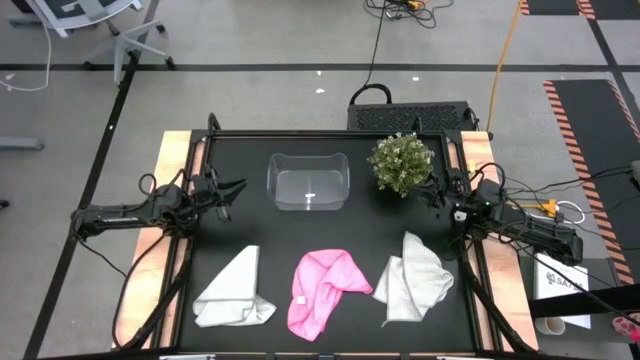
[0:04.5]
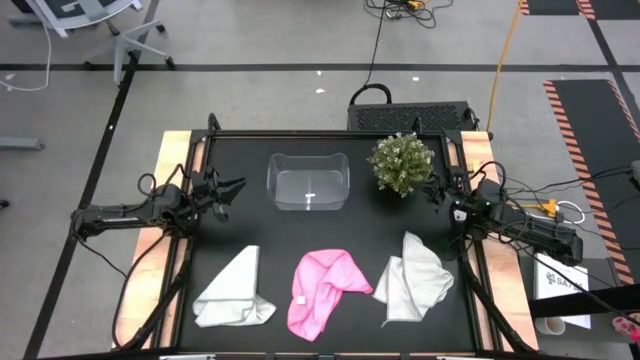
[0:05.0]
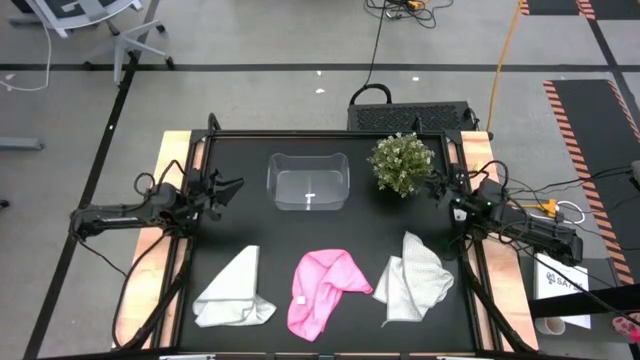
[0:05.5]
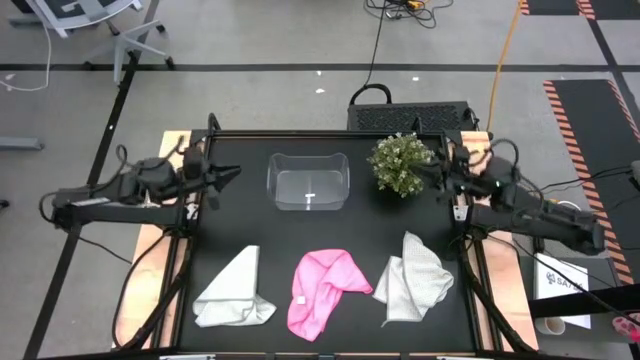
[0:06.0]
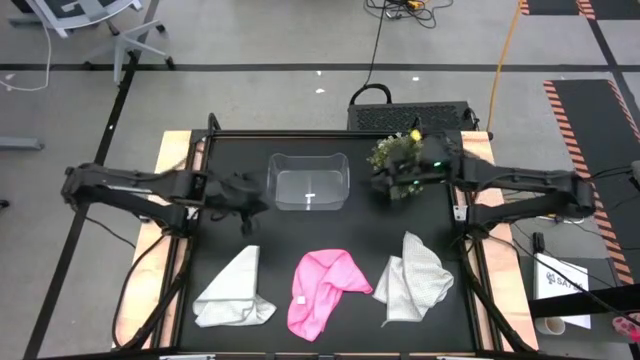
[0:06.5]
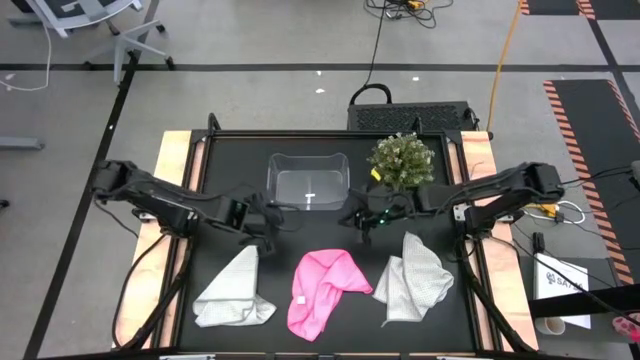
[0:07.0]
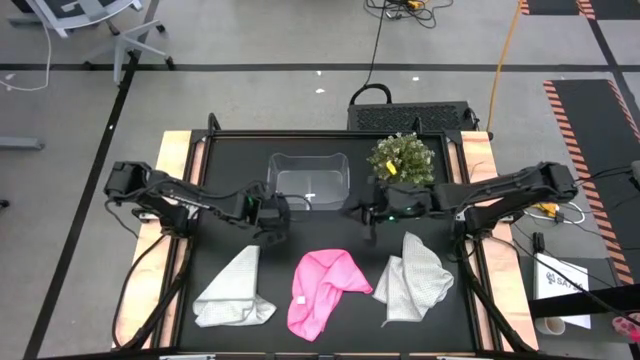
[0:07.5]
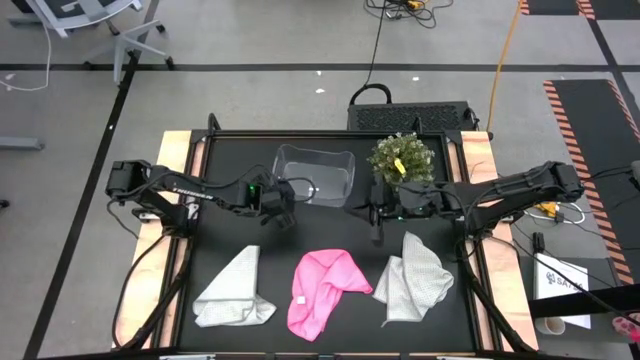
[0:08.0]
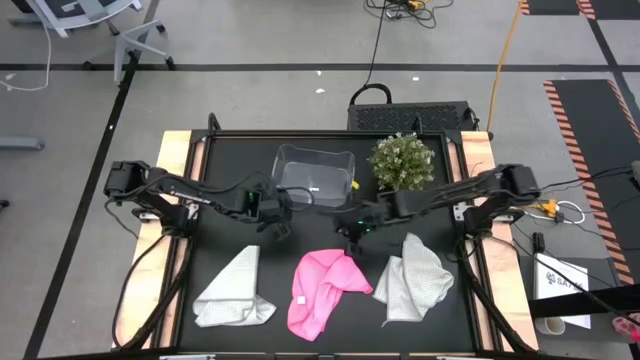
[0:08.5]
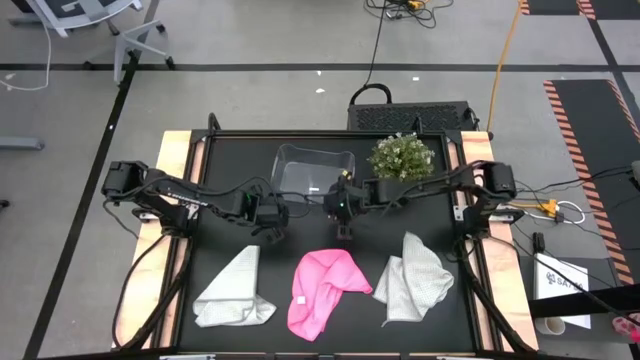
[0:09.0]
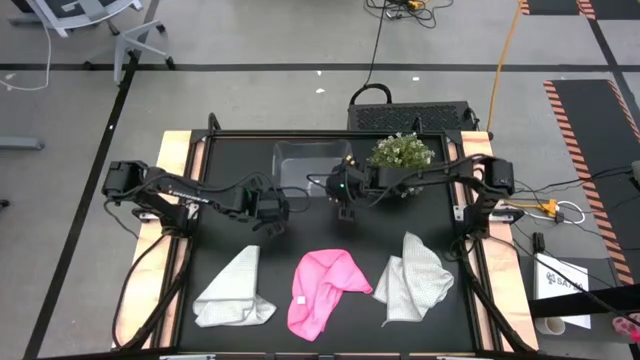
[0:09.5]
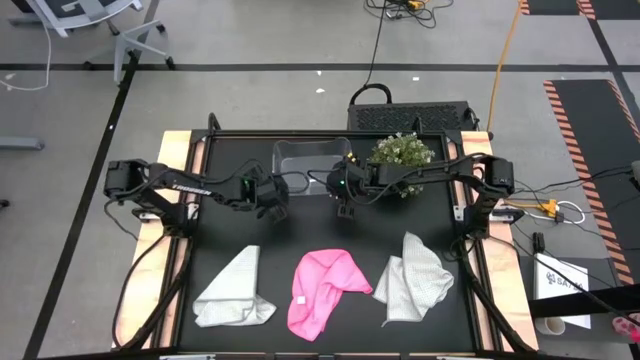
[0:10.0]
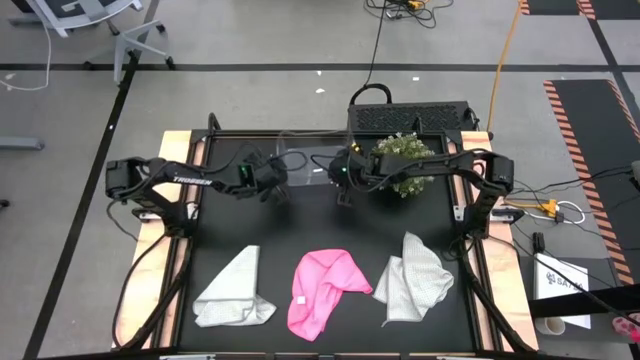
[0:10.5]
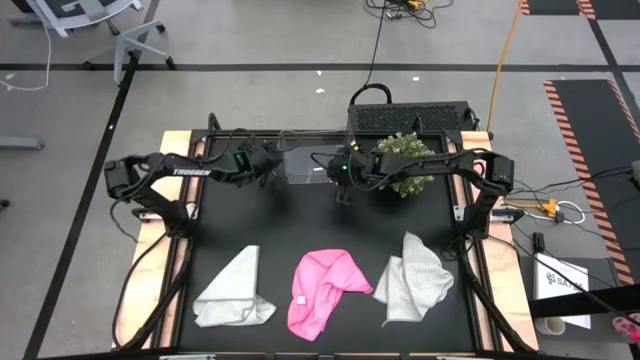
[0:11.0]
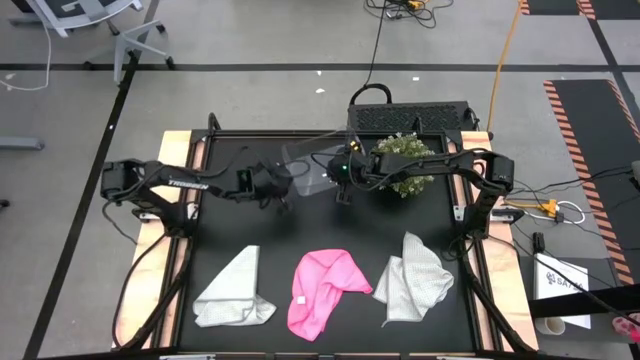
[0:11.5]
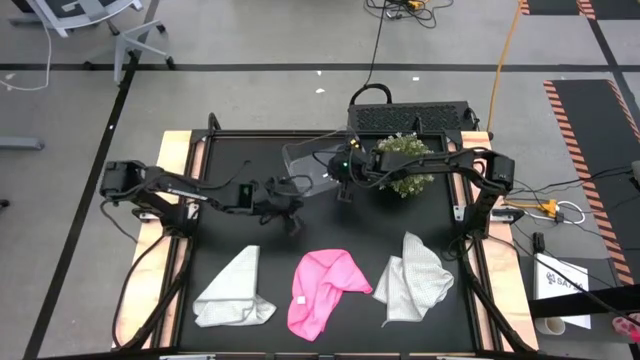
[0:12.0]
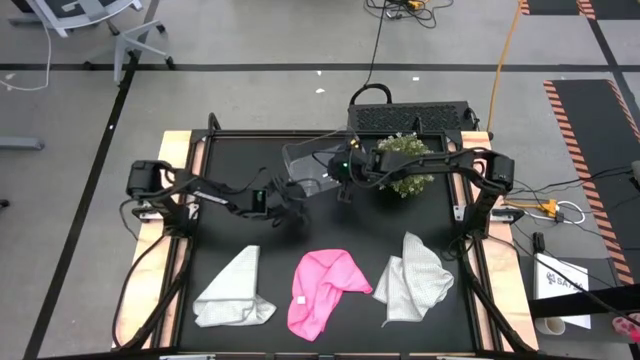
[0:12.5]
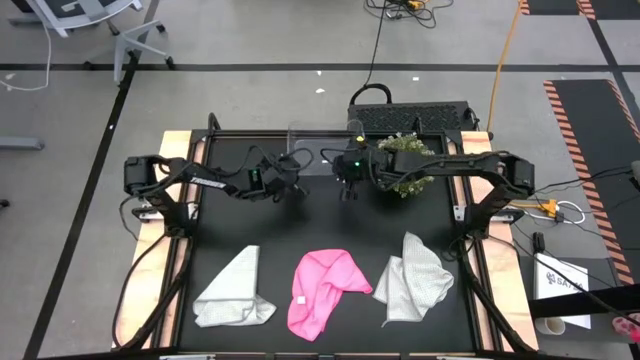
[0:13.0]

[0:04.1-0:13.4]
Task: Fold microfiber towels
Move the transparent bin to the top center of the table

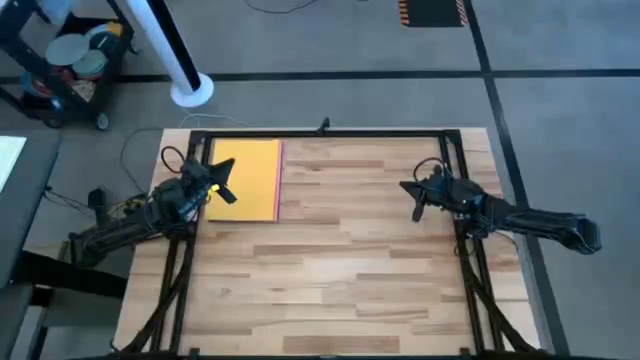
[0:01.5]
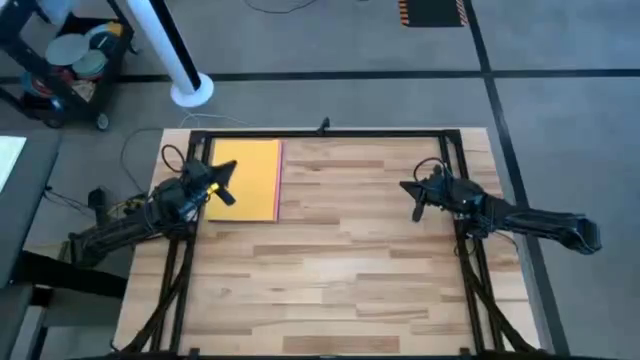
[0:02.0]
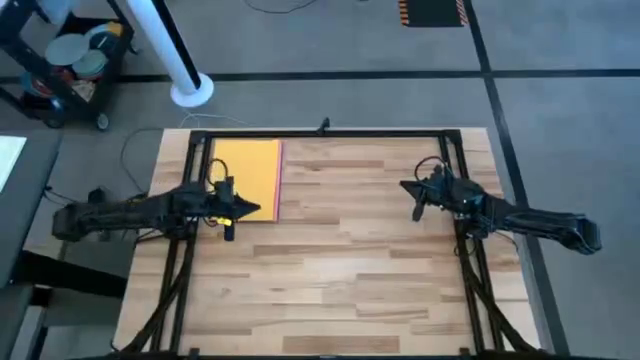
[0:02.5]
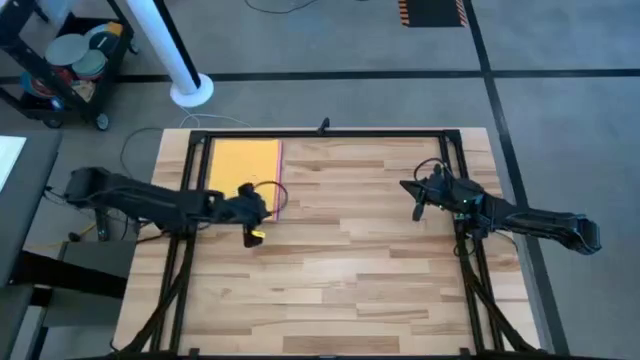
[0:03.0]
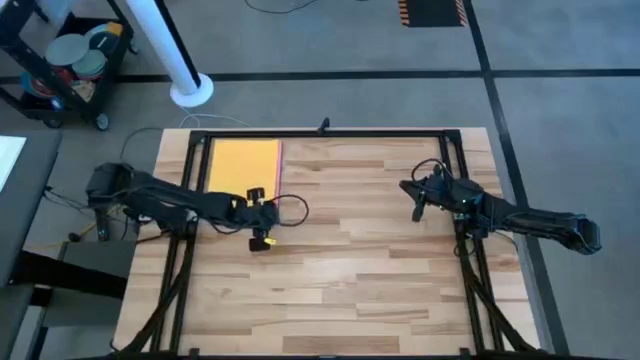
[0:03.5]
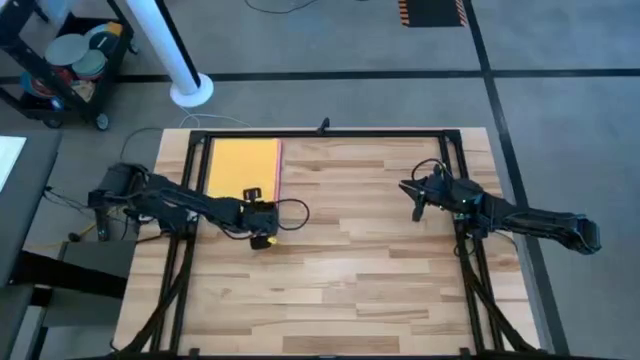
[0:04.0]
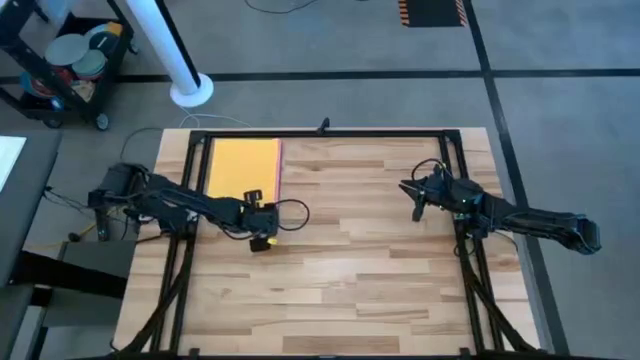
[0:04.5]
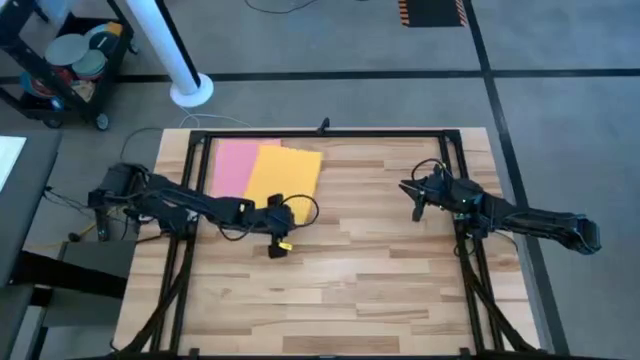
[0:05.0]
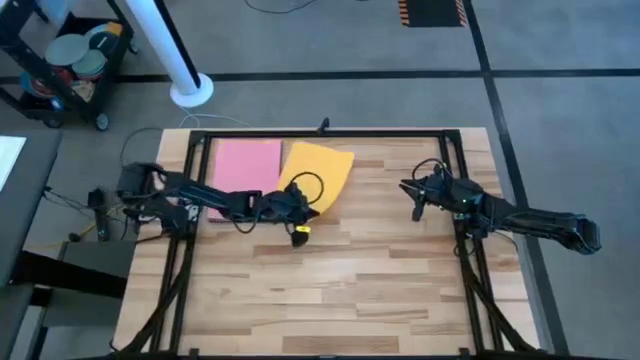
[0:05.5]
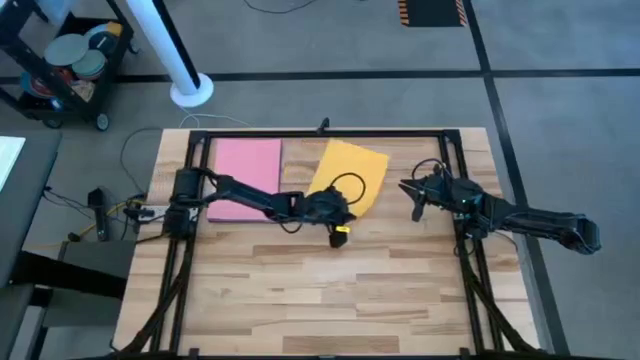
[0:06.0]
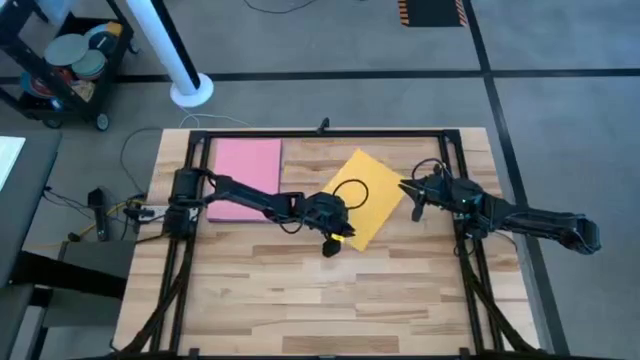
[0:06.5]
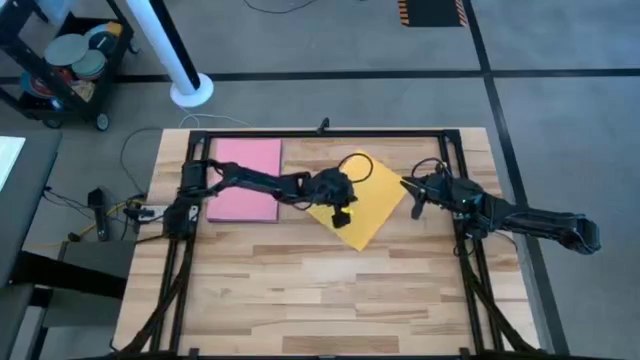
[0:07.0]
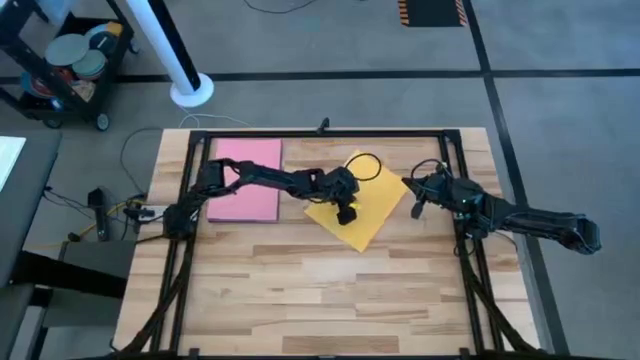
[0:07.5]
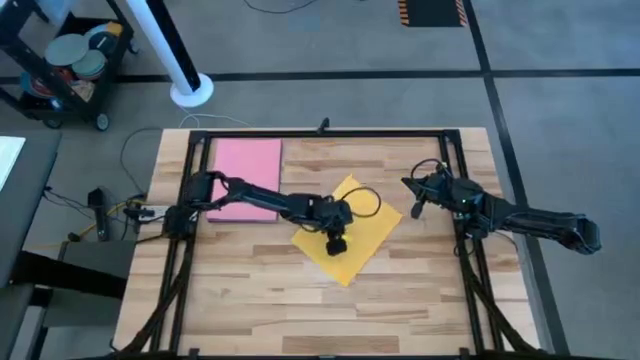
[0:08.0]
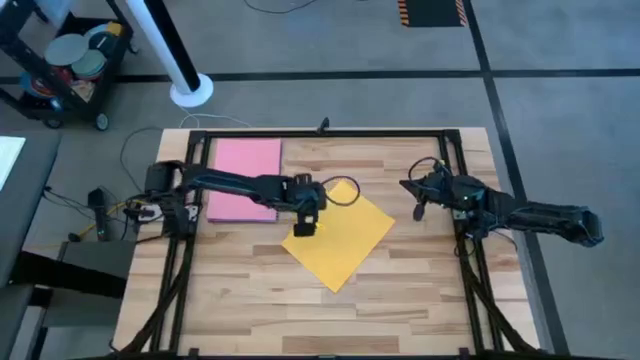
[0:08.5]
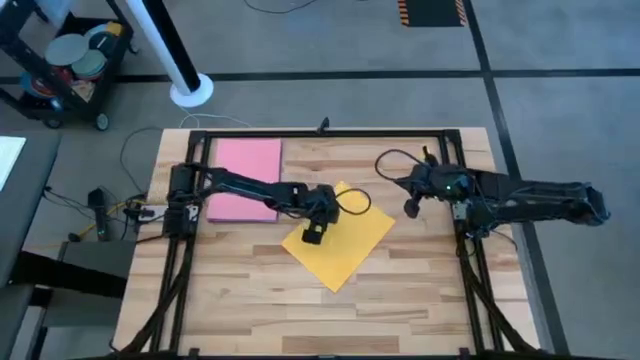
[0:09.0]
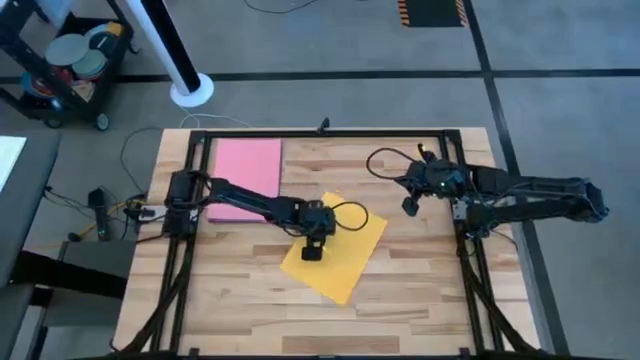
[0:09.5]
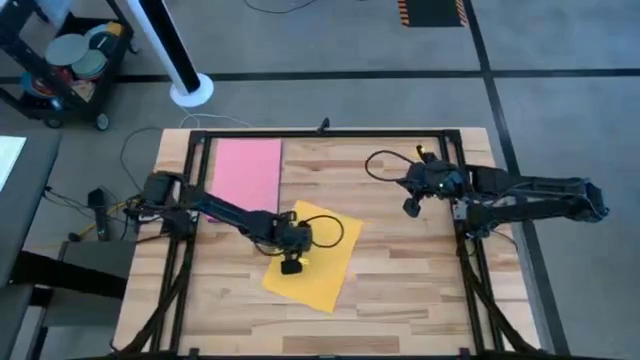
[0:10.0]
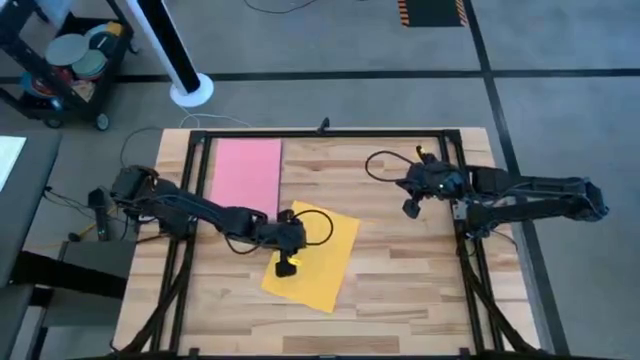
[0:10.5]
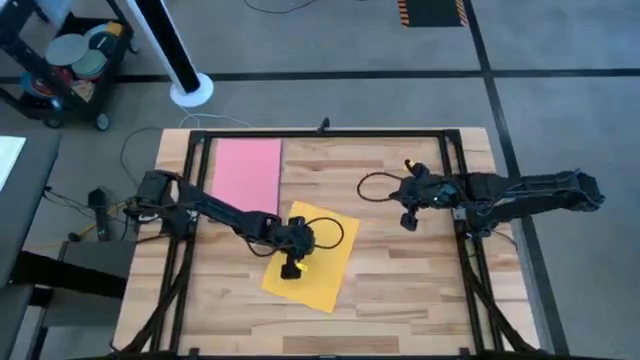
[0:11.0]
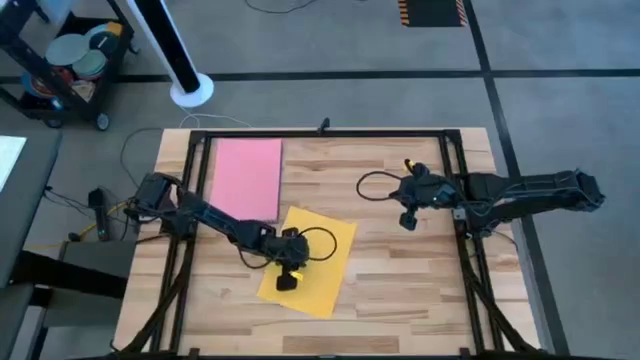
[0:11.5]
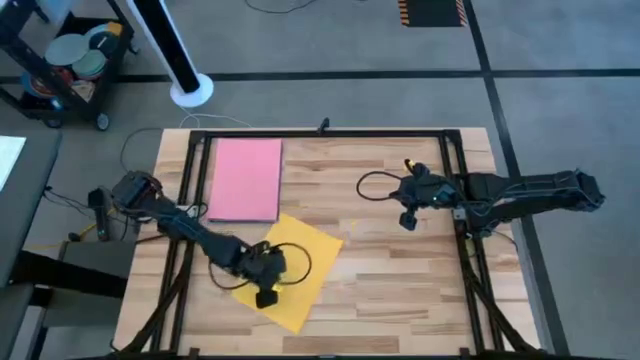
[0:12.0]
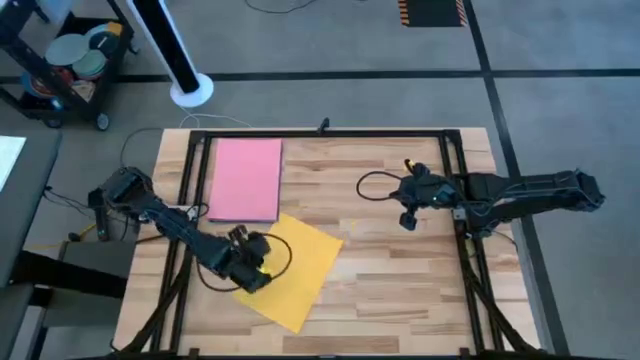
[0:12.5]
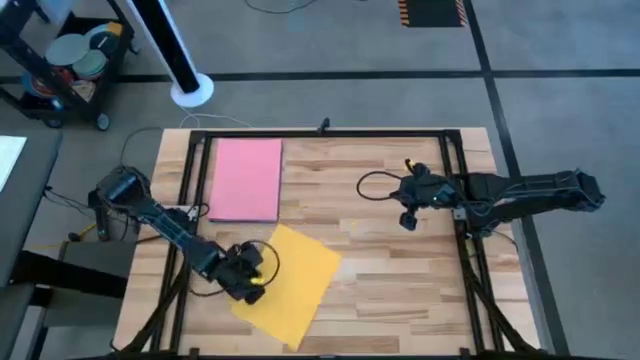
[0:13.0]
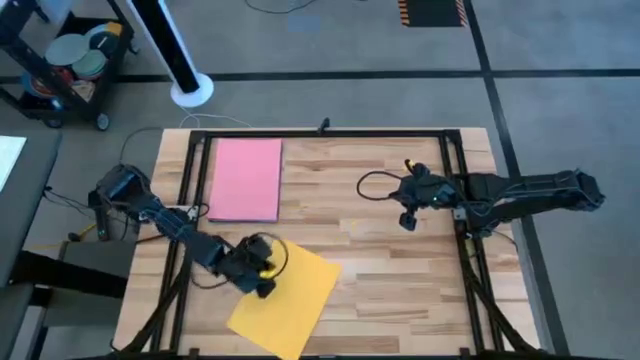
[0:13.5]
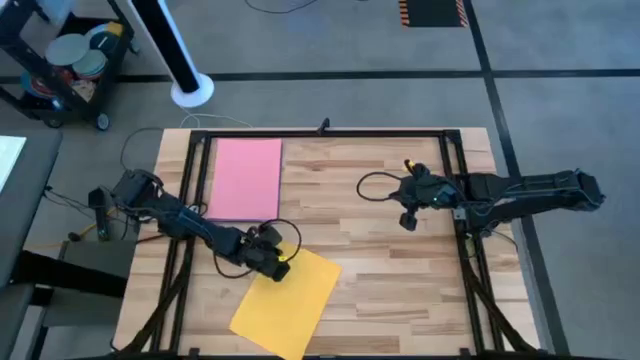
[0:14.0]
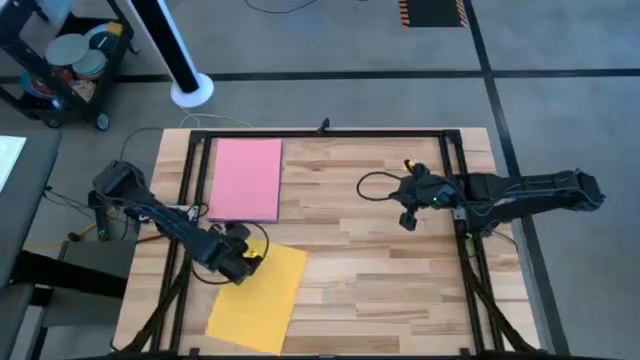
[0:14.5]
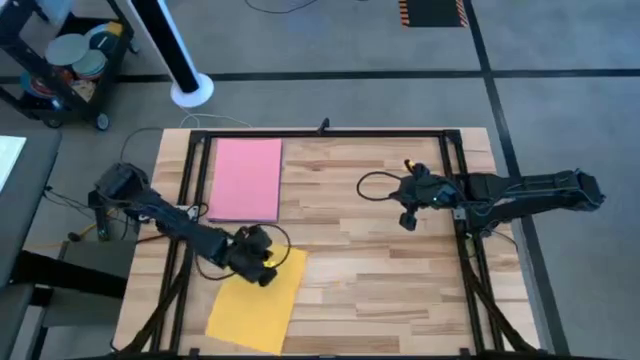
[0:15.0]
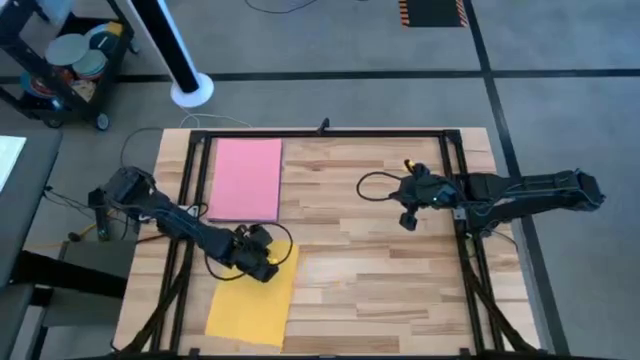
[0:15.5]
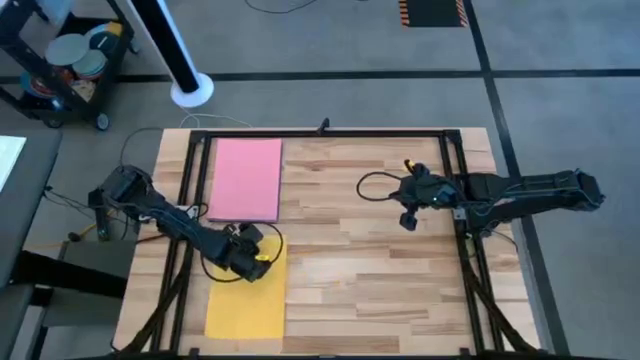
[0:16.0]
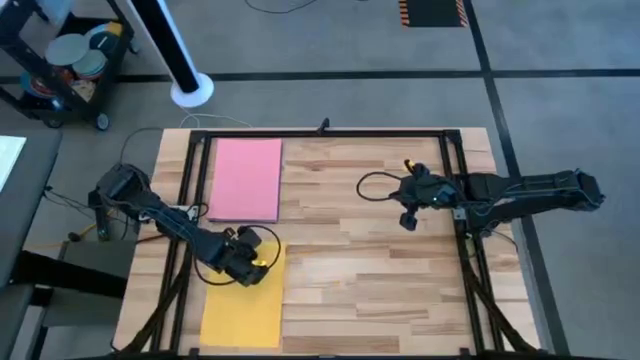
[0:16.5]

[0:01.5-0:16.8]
Task: Organize paper
Put the yellow paper to the bottom left of the table
